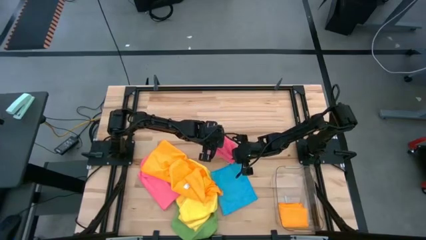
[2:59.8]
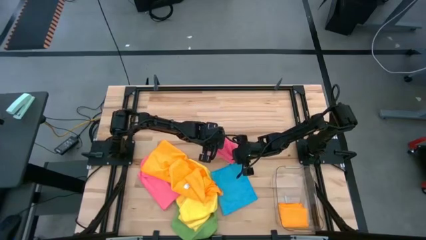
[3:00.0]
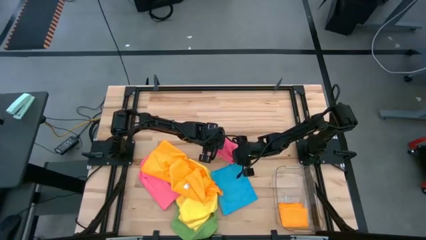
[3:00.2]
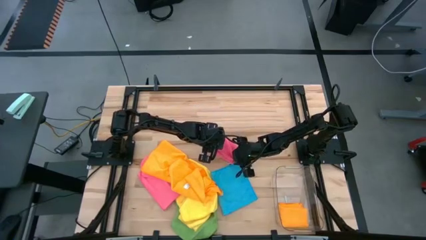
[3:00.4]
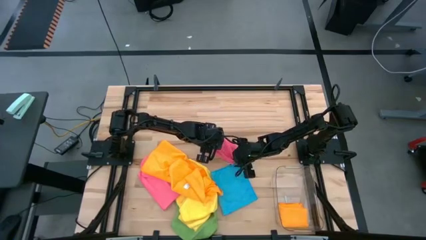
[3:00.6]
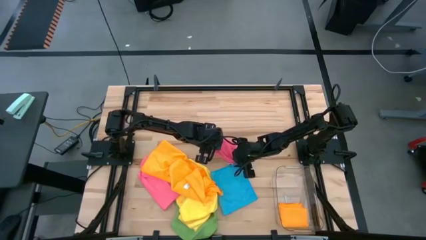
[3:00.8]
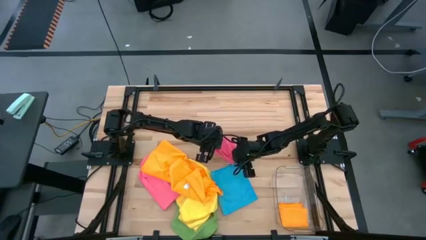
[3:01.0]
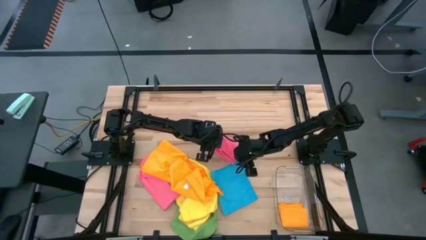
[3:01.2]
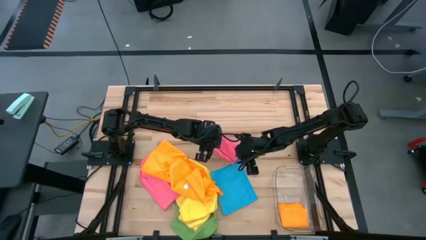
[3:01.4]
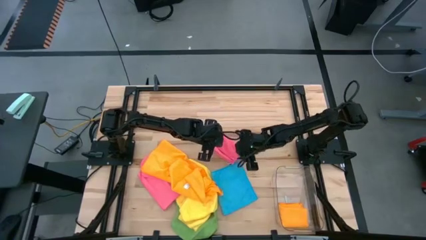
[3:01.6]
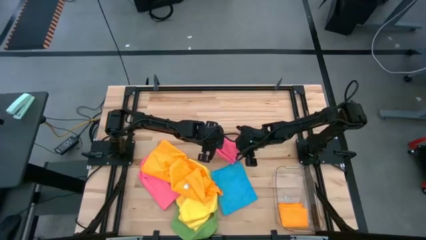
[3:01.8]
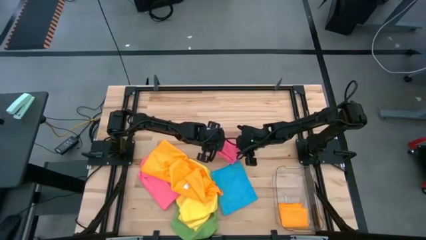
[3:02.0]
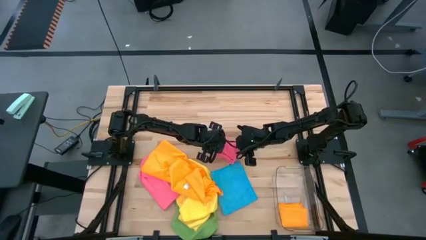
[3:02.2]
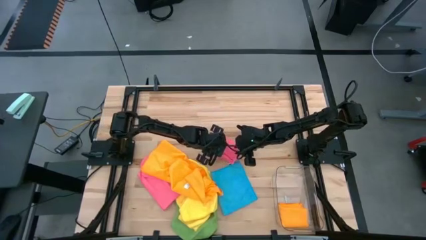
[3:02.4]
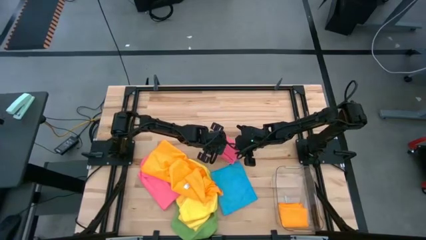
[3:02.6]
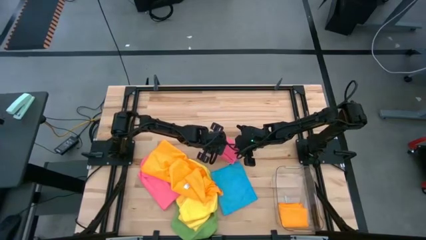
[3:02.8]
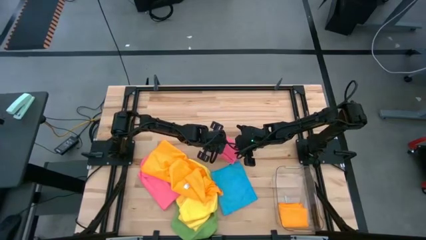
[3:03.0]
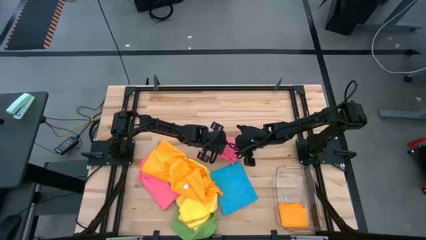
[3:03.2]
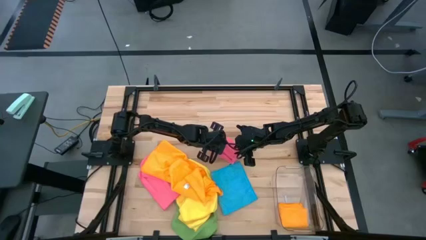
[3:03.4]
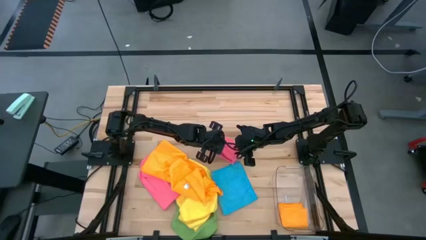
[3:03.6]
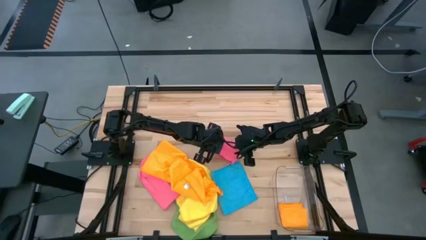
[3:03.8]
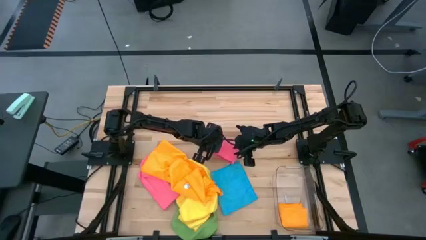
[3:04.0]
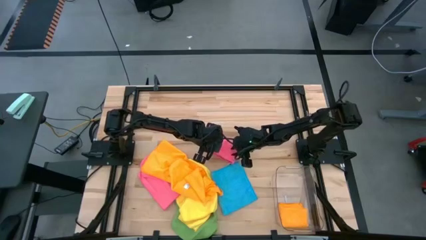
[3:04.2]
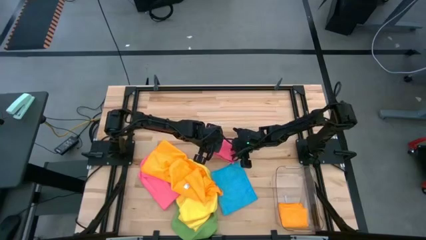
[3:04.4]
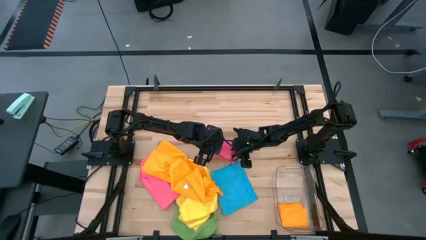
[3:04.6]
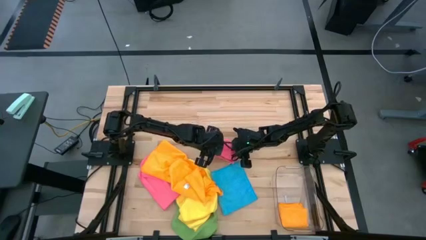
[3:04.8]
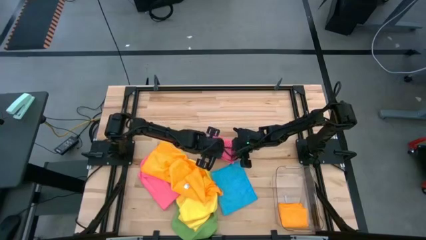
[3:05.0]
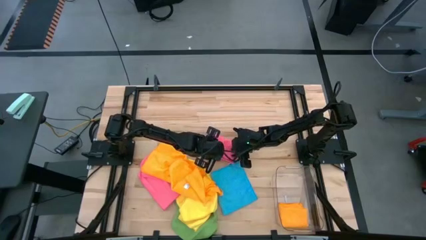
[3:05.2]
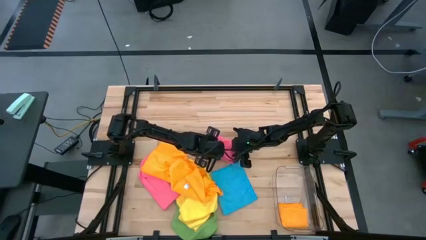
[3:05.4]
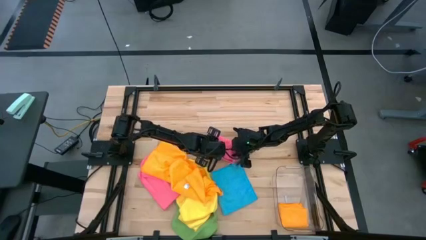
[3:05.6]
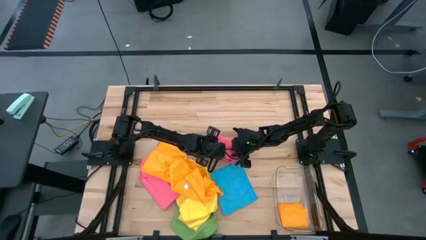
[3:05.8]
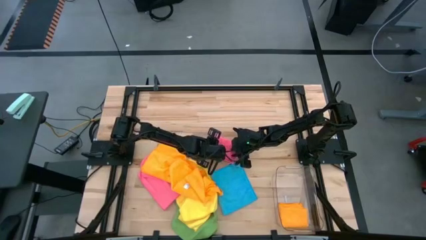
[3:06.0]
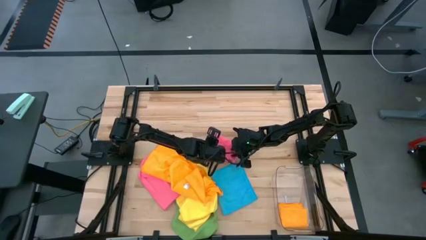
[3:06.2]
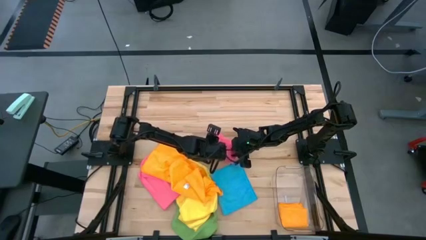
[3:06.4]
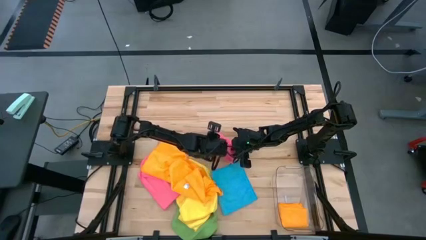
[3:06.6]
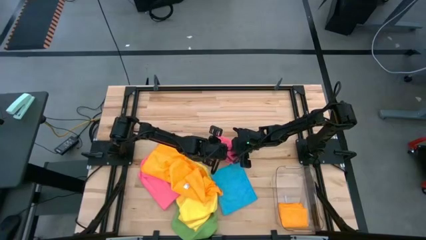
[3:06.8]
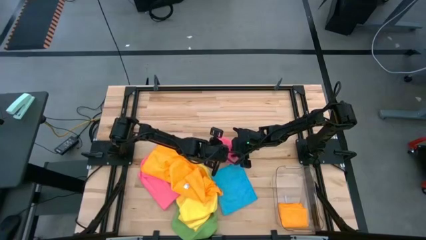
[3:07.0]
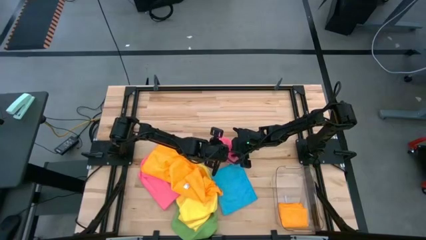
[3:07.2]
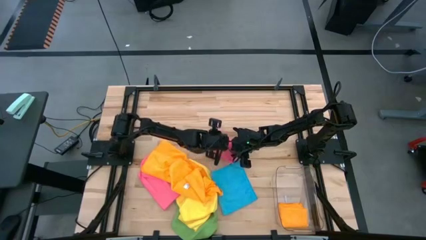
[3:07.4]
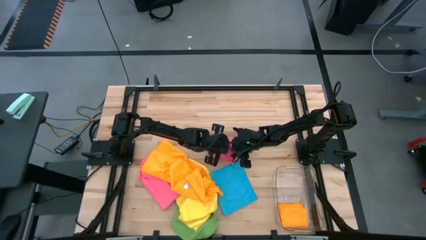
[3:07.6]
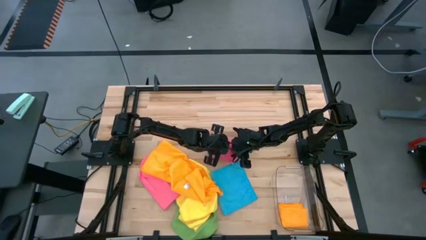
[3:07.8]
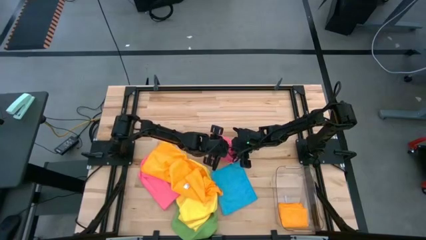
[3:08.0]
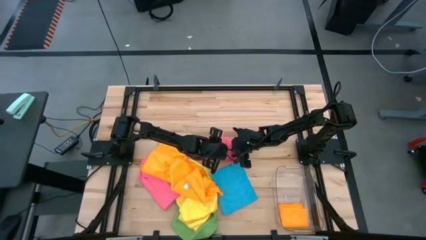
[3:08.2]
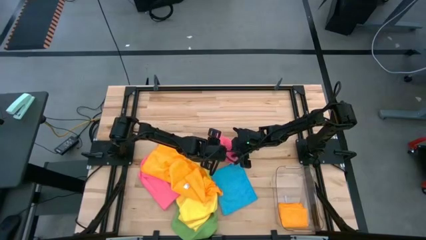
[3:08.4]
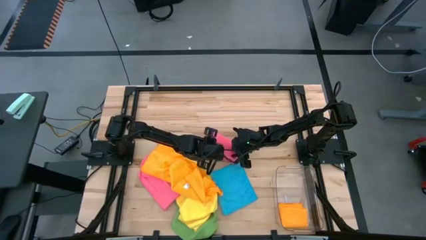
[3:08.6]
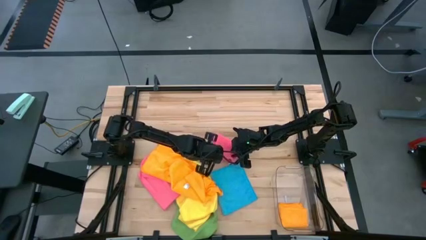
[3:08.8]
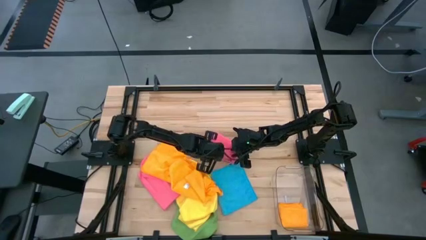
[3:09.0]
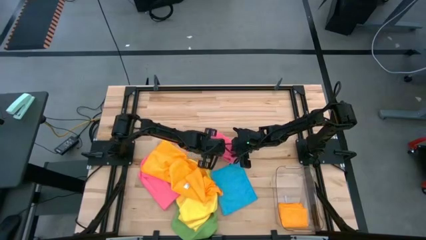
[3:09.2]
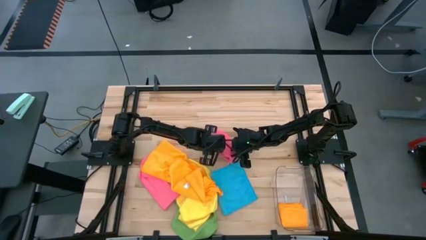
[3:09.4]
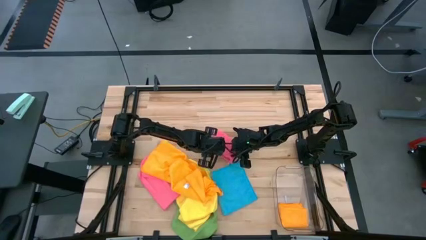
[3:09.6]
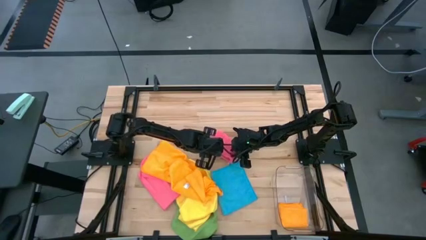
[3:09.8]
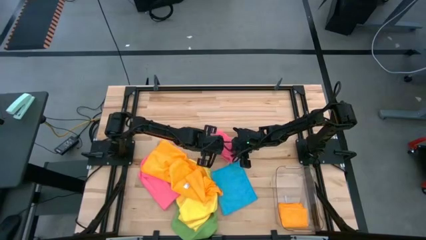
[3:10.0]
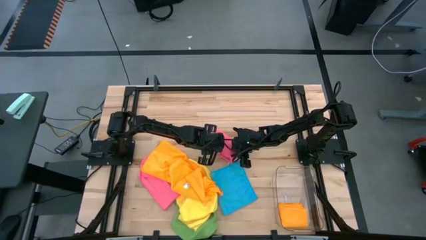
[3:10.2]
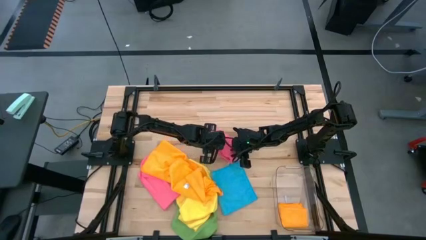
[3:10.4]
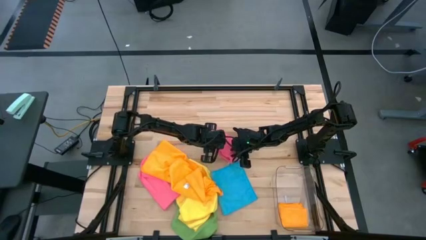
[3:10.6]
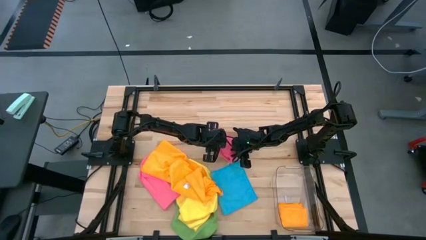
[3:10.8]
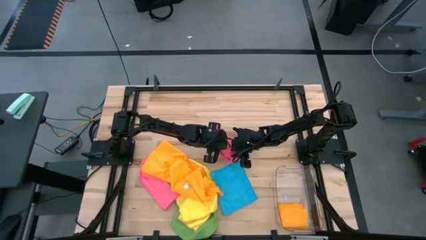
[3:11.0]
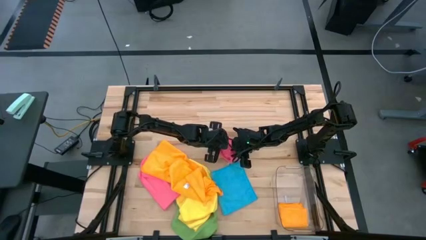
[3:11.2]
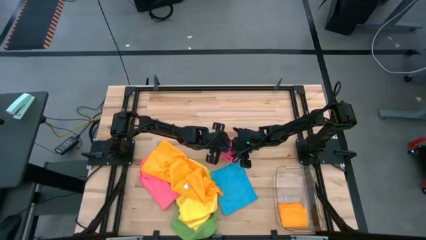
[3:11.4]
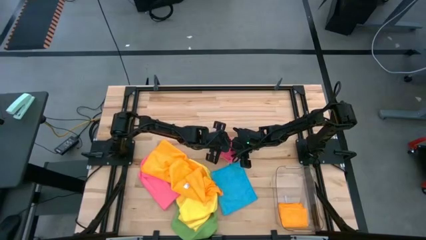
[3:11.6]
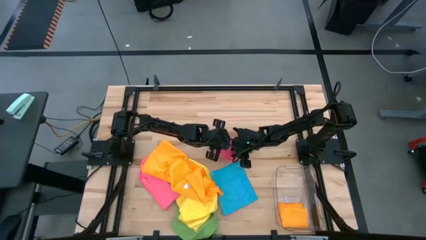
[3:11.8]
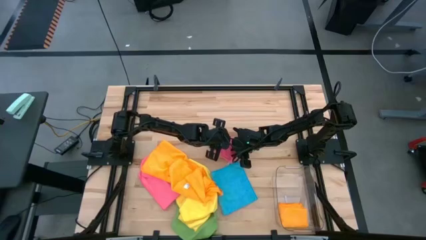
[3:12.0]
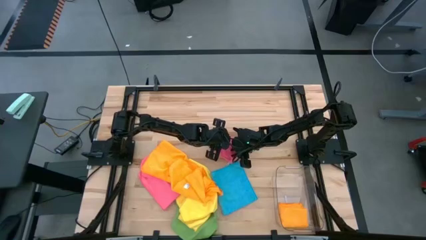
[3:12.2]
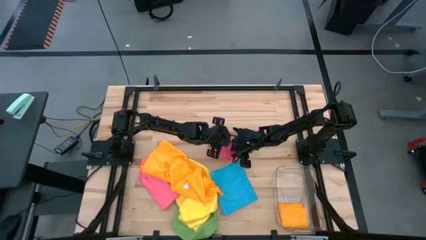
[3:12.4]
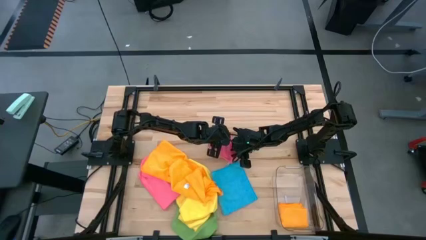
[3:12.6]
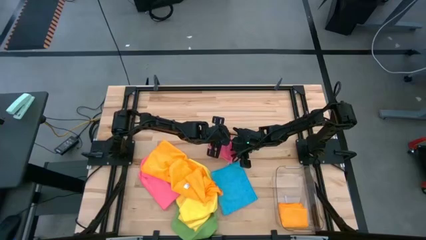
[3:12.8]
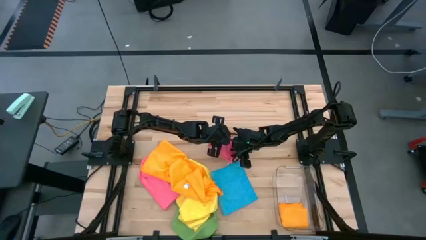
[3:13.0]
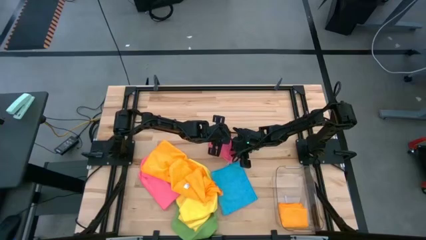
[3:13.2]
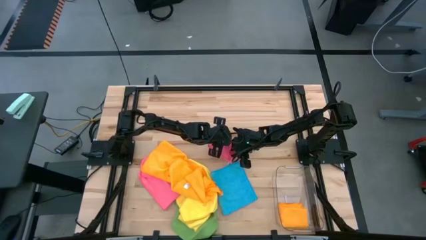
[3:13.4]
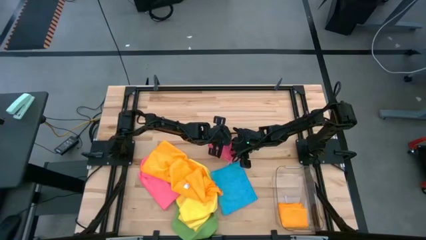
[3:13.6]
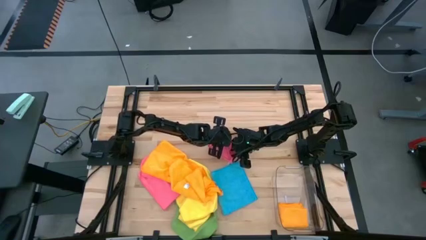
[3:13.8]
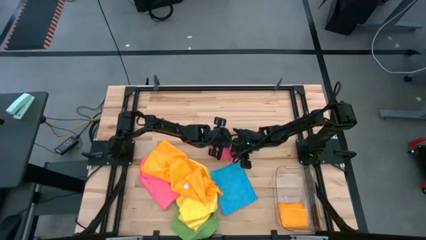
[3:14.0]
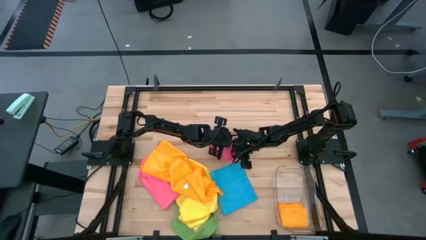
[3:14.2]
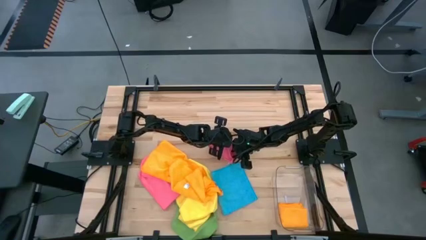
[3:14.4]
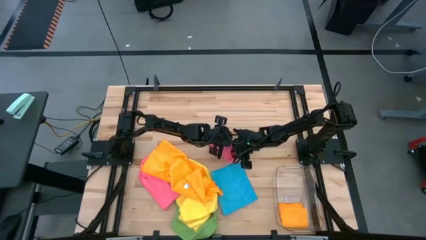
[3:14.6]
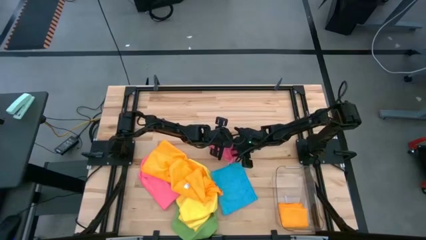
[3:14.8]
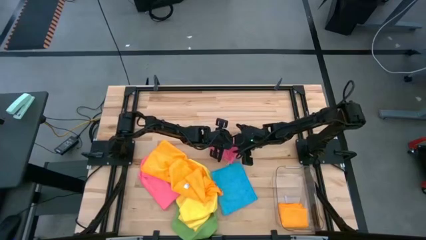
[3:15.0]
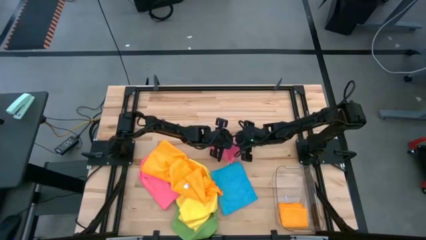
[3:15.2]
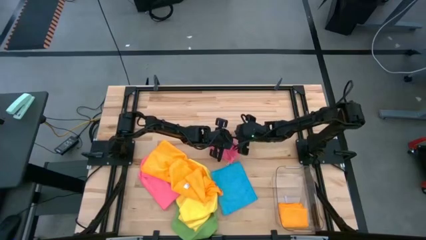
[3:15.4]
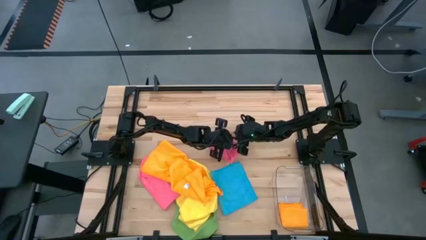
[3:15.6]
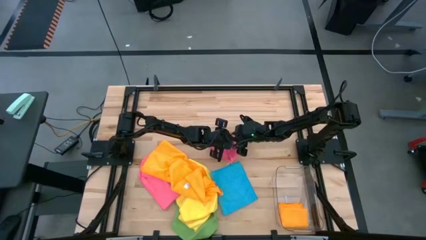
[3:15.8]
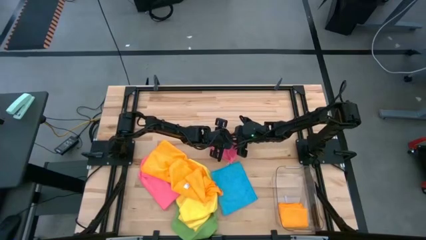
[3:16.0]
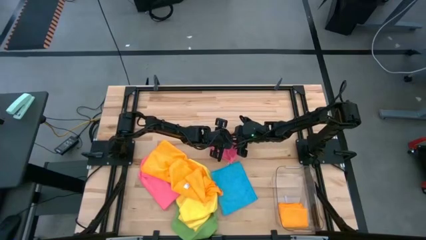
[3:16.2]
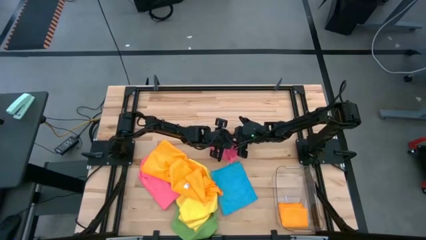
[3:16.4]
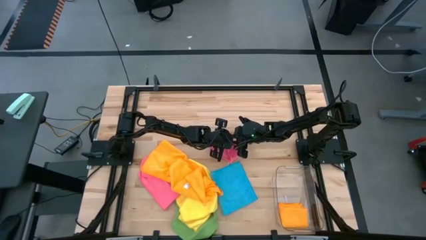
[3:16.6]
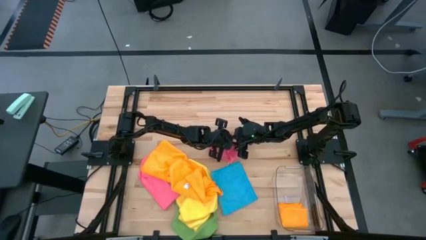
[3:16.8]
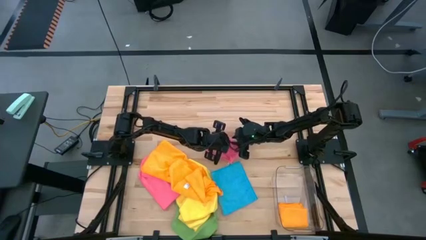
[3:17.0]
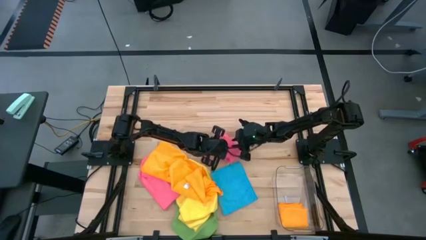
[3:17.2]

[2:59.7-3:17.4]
Task: Fold microfiber towels
Fold the pink towel
